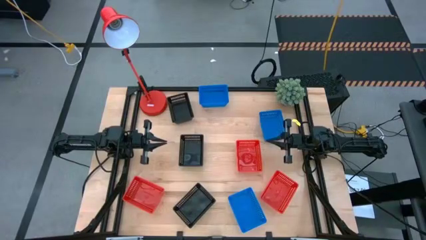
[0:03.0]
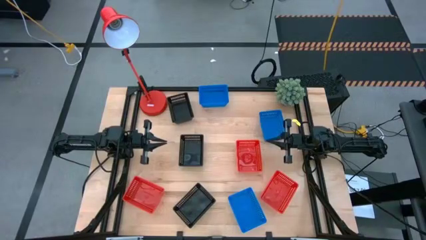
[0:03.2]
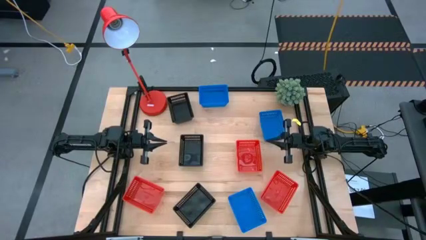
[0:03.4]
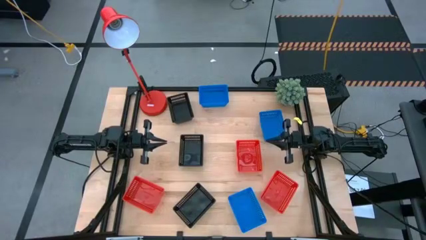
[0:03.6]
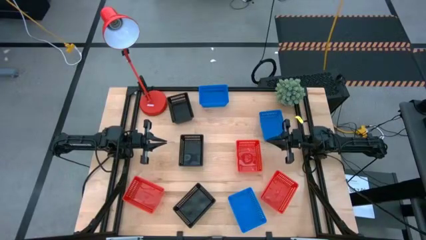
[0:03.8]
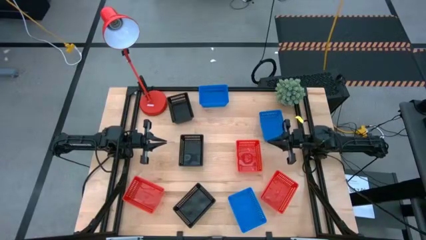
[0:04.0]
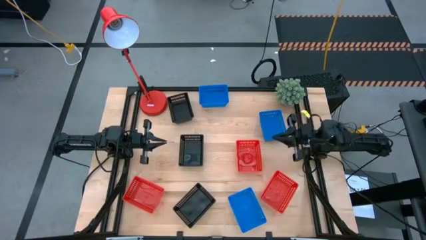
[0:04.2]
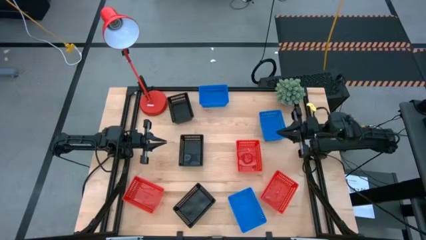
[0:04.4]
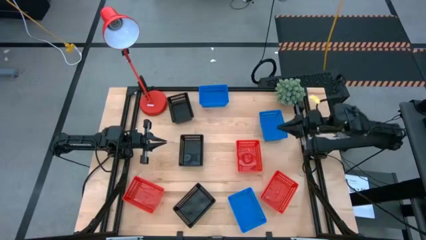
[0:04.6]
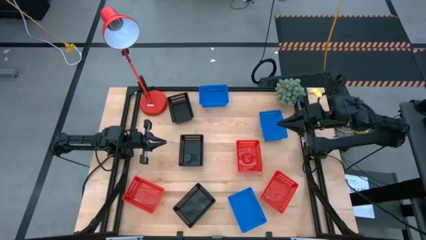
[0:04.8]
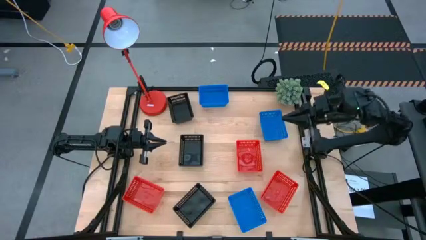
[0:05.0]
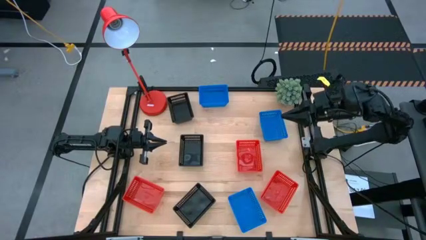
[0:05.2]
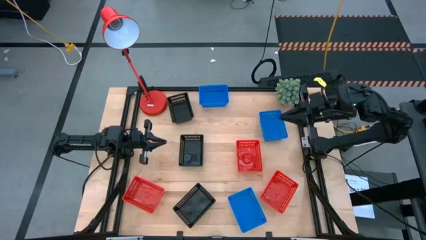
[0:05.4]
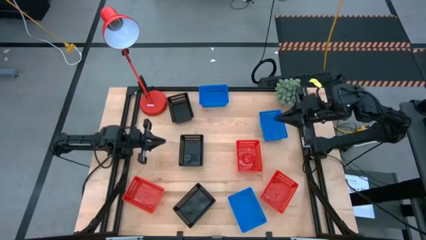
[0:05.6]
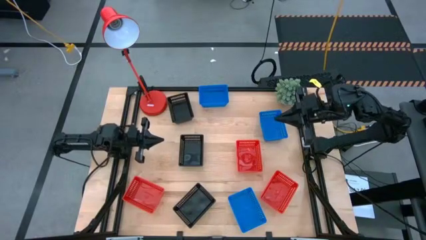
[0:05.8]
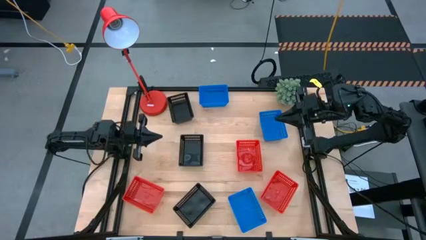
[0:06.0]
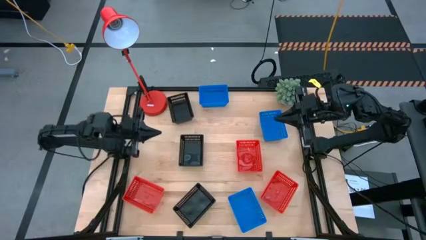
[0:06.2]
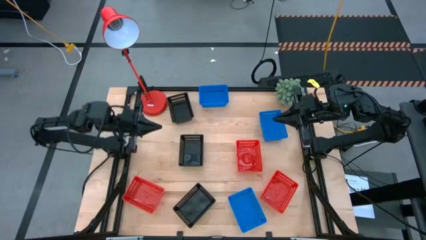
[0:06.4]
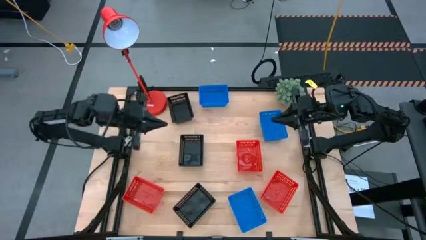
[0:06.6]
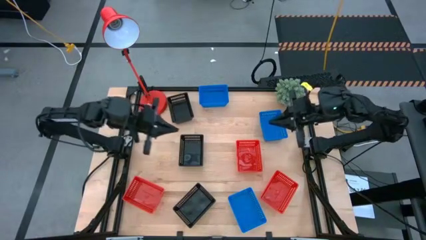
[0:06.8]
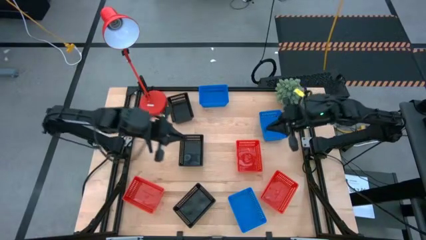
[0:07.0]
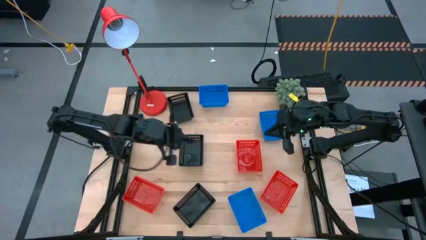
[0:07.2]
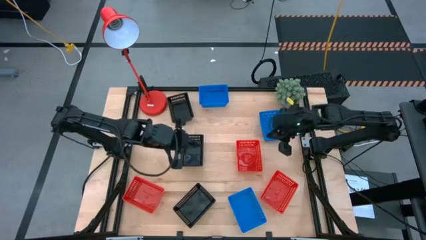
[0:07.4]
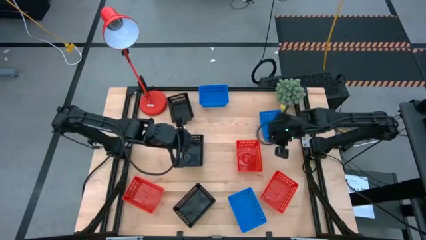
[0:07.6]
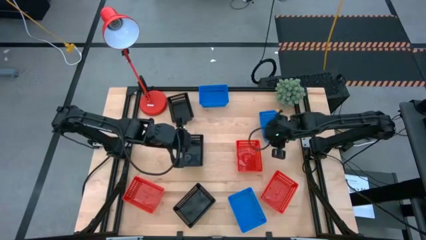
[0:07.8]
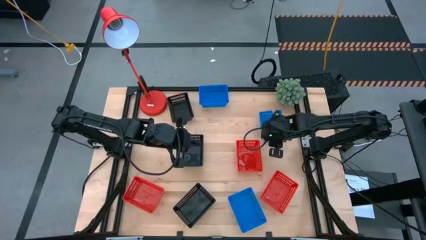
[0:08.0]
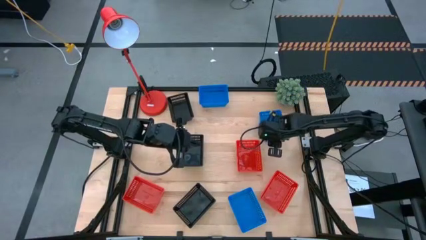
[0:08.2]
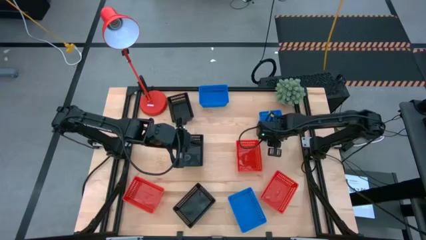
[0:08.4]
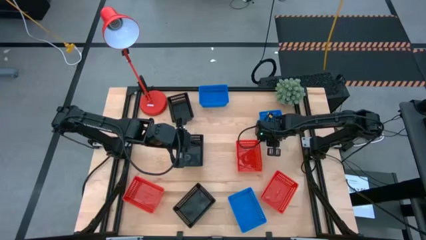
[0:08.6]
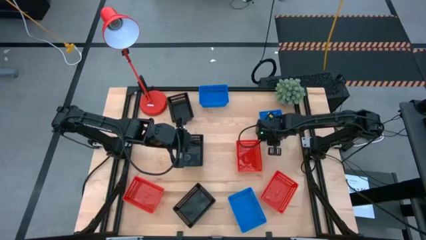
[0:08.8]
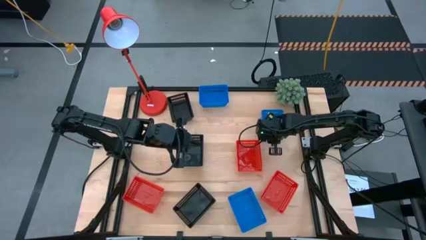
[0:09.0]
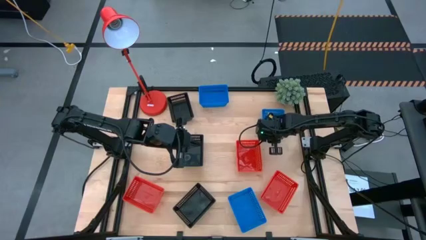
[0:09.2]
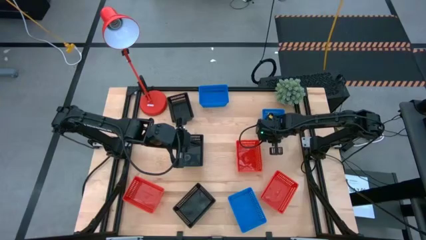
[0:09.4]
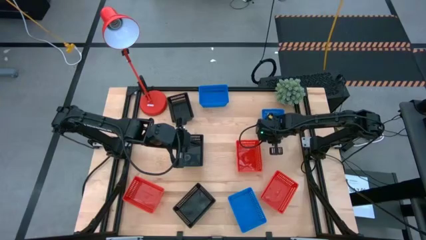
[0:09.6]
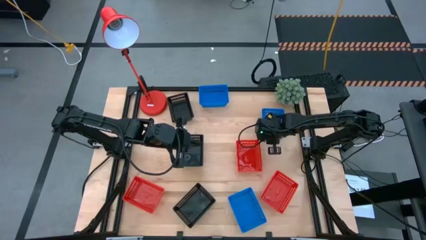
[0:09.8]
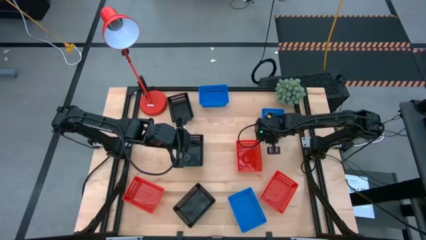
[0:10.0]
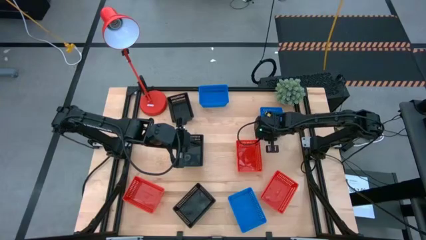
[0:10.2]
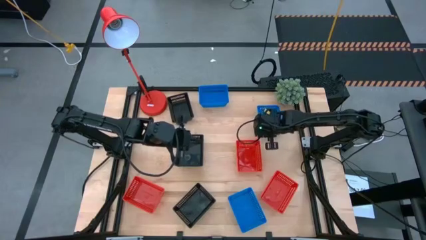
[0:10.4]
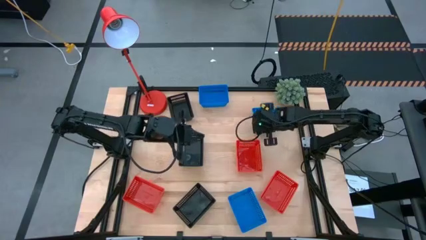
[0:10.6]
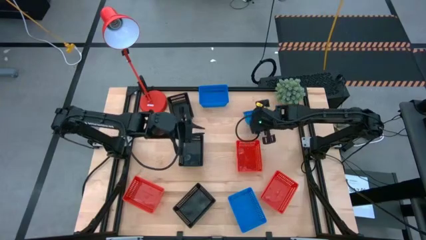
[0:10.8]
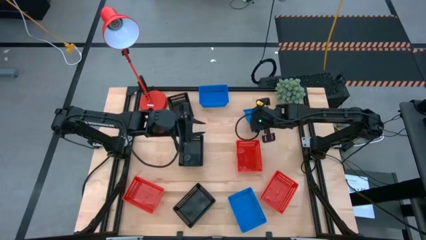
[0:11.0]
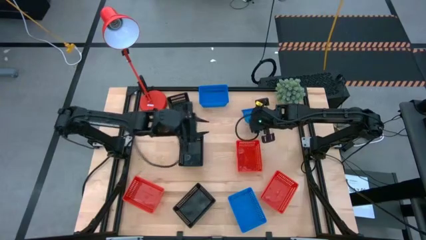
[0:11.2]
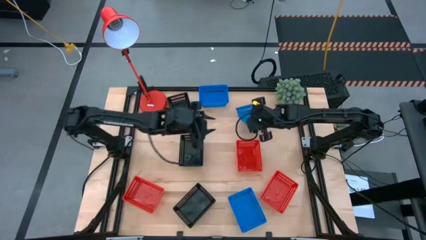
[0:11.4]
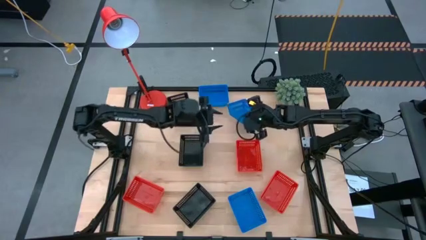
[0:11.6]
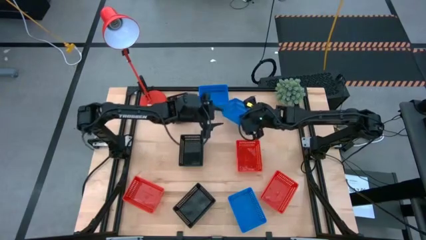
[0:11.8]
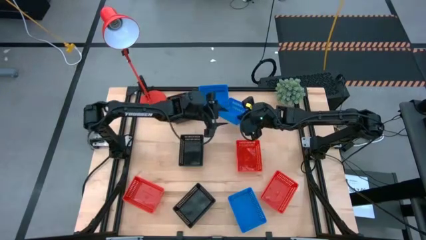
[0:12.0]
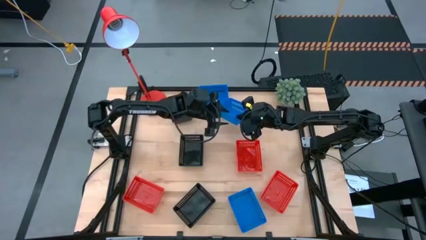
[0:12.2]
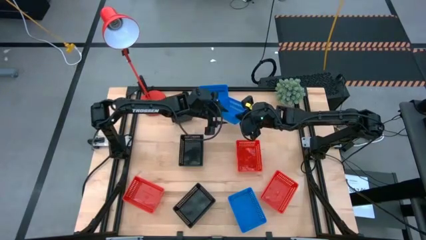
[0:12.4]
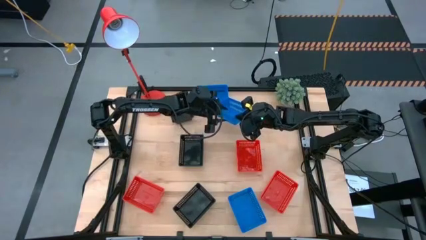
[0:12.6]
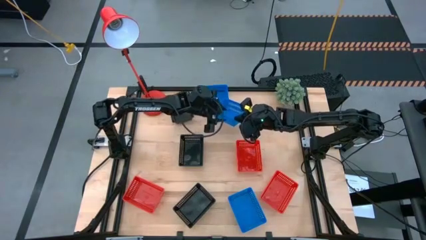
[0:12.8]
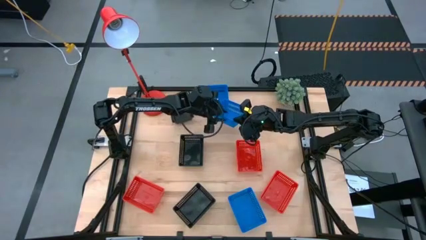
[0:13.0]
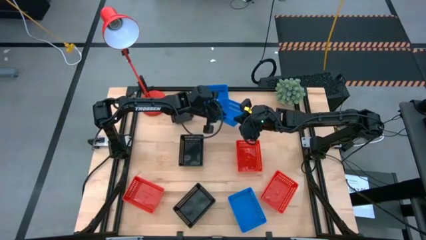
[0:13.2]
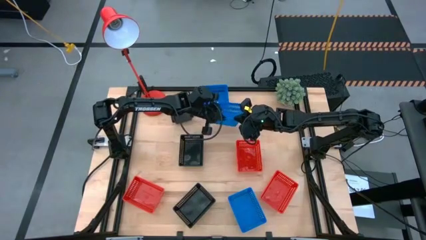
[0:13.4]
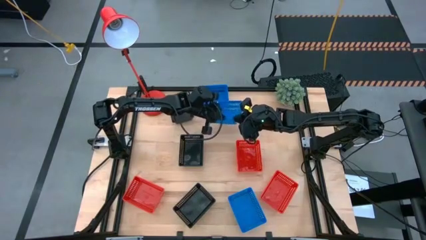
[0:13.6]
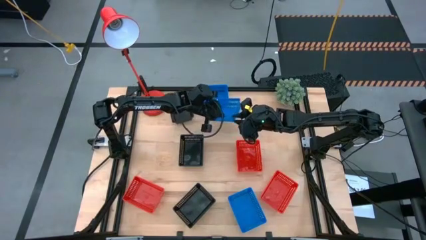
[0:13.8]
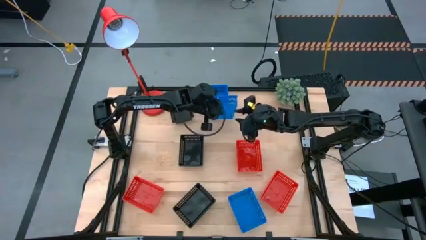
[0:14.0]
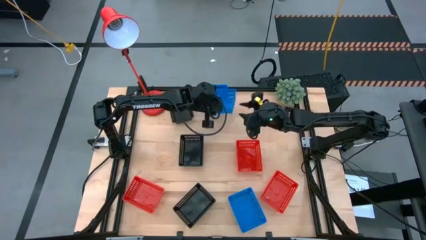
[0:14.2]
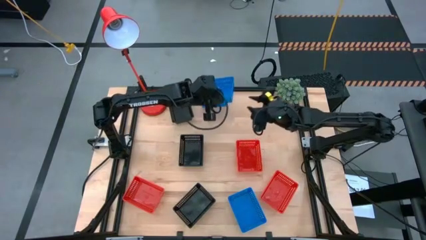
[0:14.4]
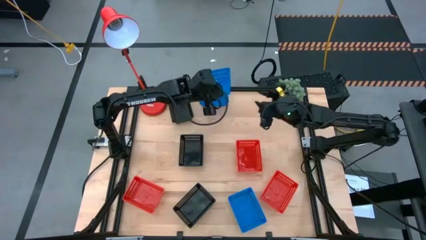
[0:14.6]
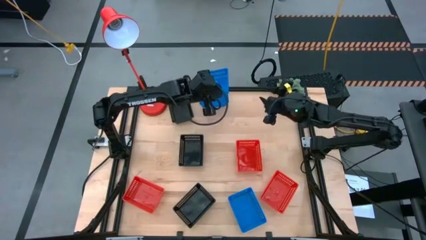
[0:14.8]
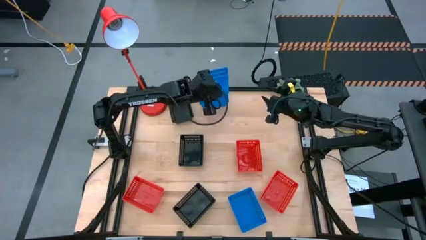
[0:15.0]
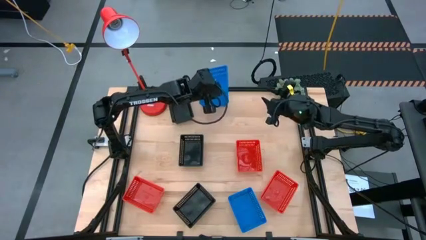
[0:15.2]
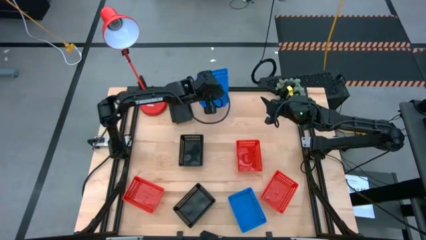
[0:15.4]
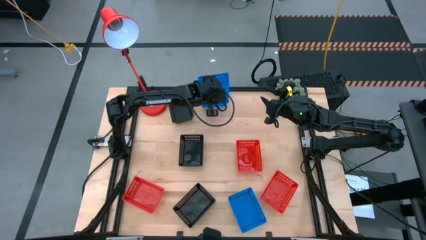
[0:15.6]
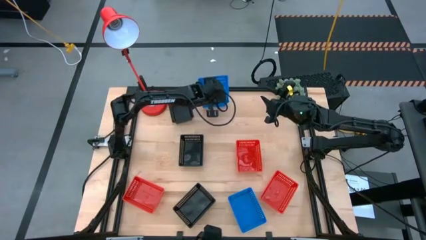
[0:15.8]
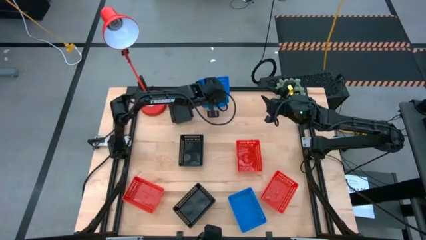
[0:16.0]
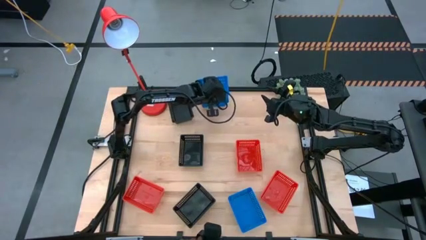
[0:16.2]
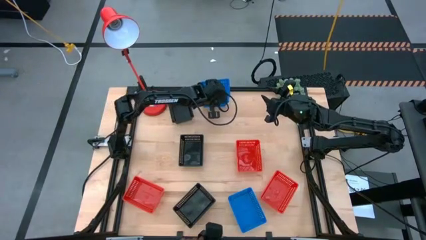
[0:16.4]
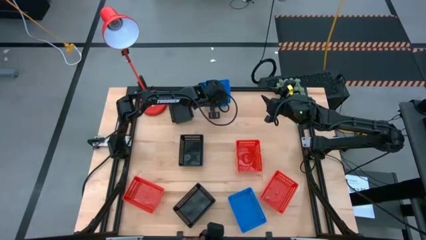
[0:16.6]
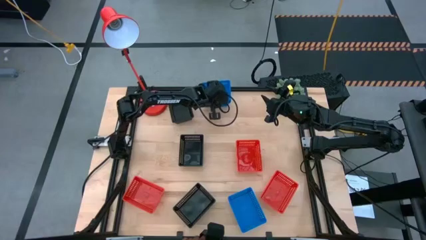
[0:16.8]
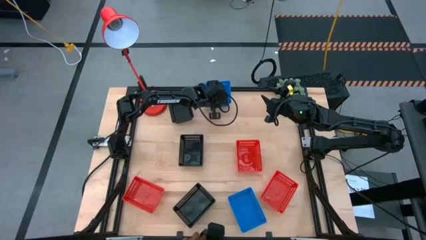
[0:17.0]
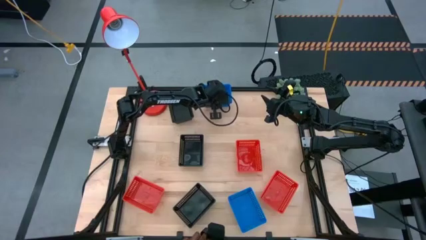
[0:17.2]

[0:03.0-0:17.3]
Stack the middle blue bin on top of the top blue bin
